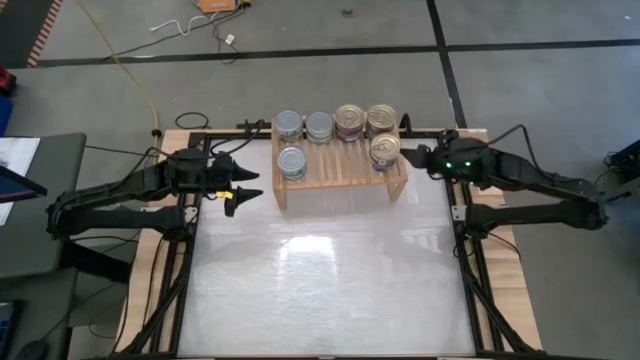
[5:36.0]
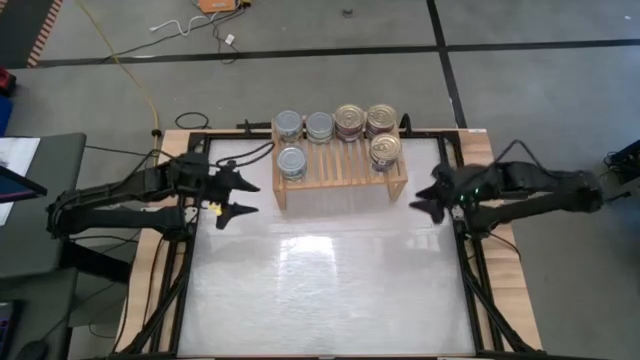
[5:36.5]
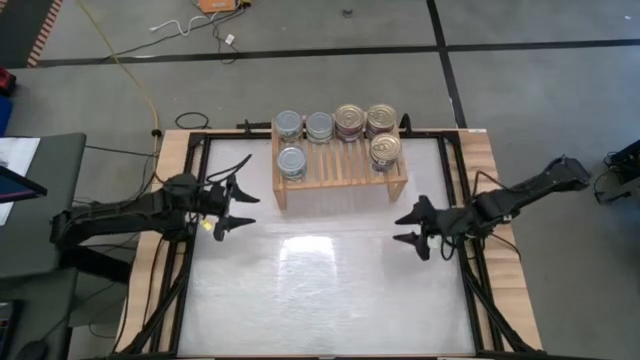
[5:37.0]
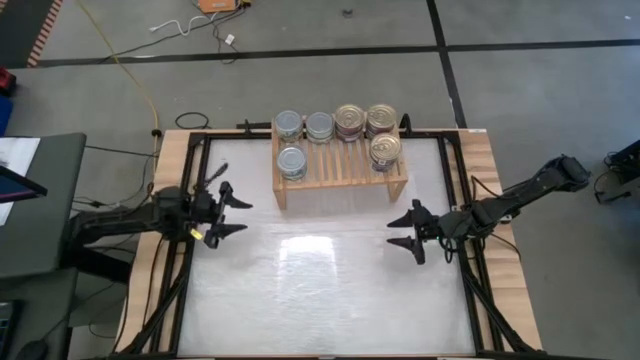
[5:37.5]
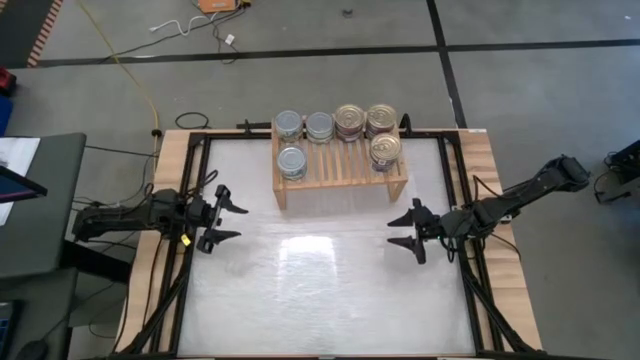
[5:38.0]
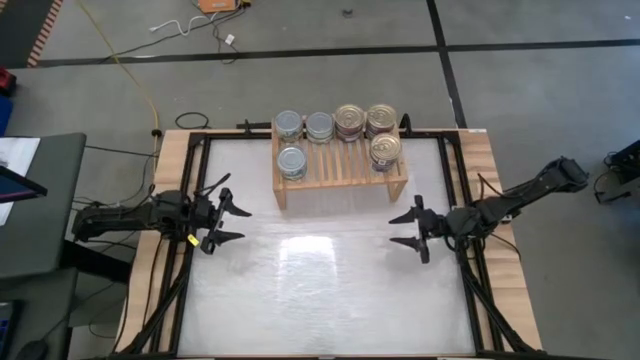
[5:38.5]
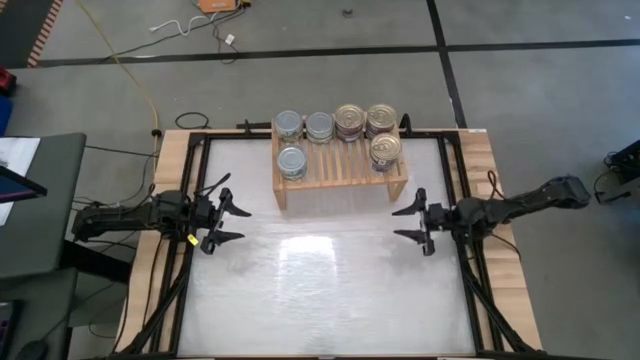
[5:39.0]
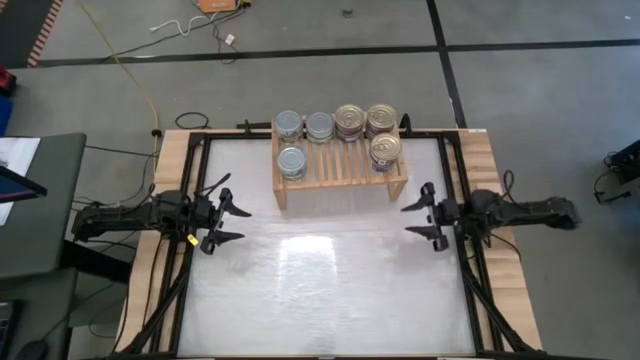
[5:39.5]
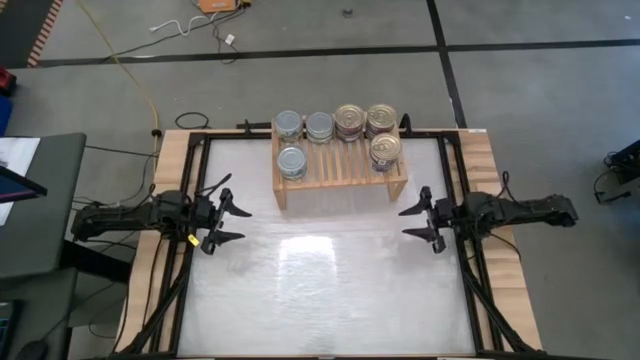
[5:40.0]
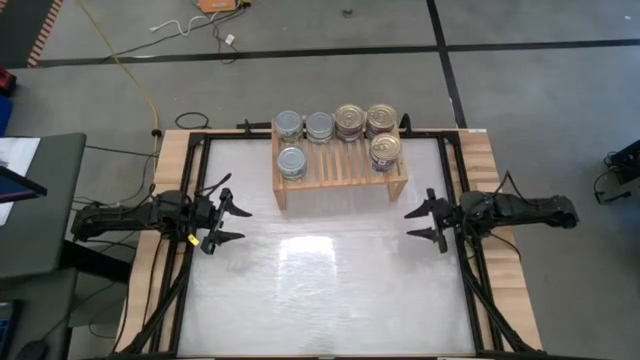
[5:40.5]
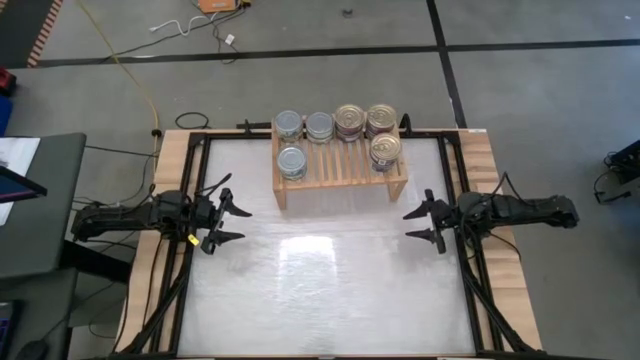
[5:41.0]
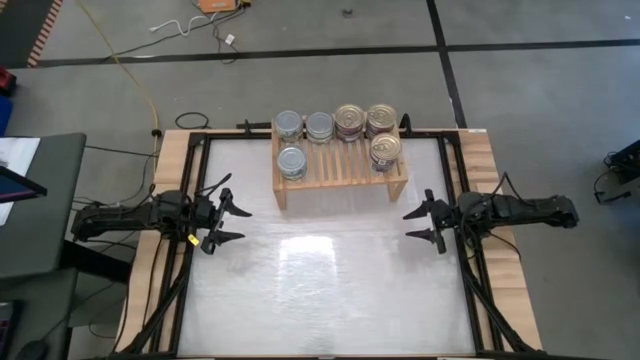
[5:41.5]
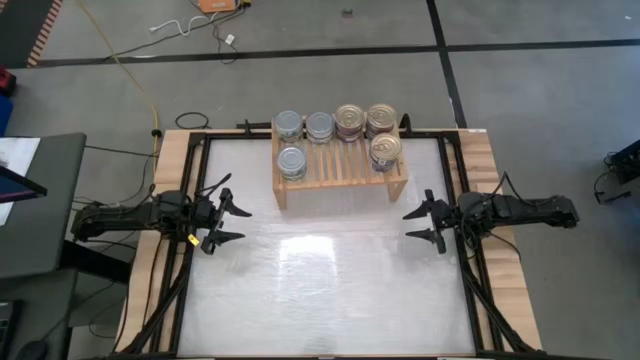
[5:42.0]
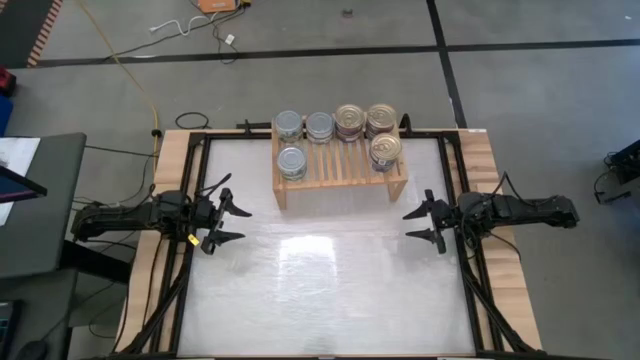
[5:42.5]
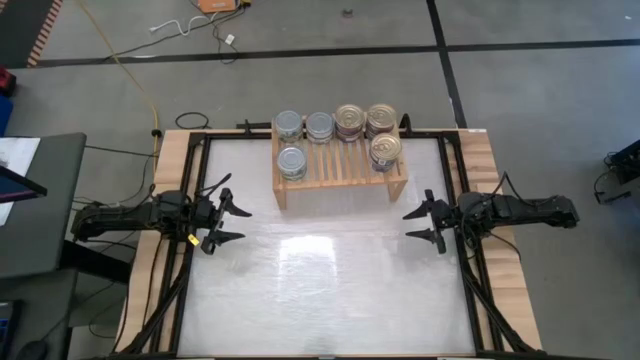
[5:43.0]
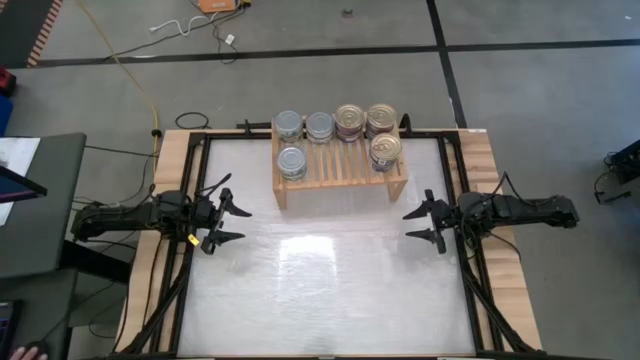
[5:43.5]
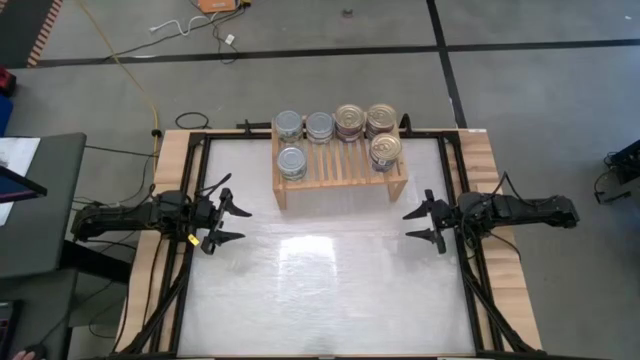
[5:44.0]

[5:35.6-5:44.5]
Task: Stack canned seafood by type on shelf
Return to Home Position

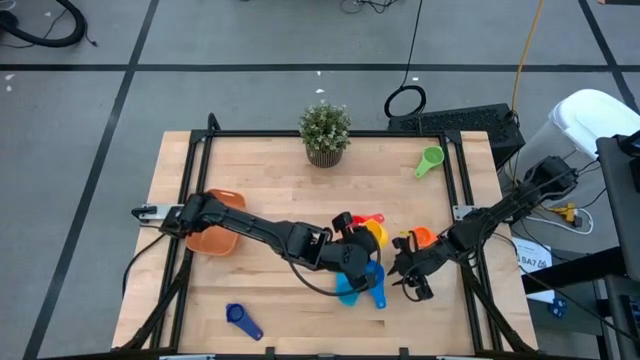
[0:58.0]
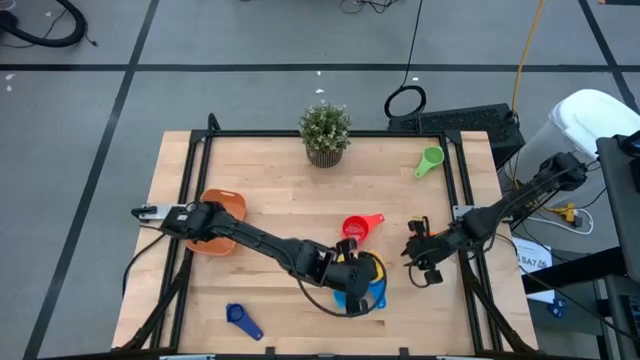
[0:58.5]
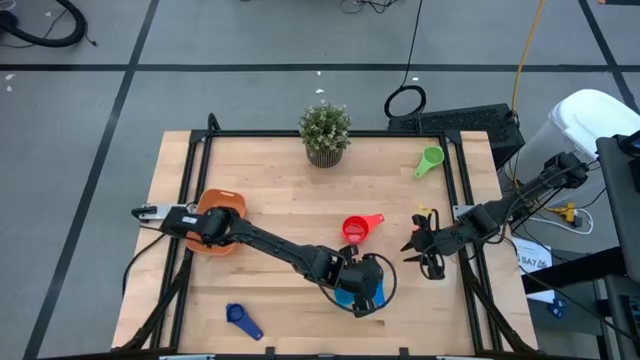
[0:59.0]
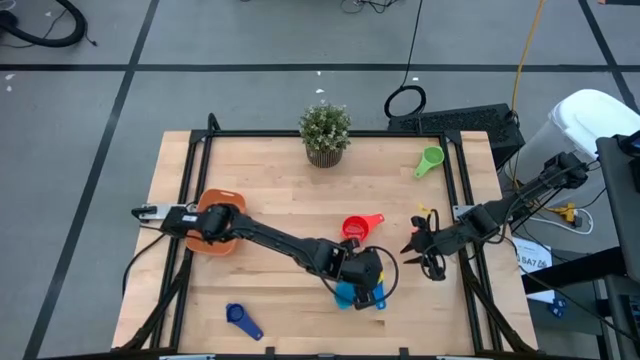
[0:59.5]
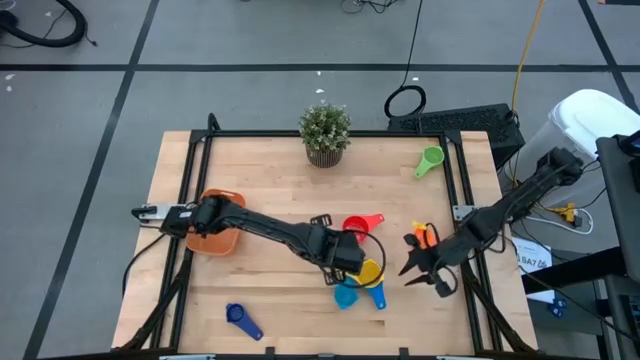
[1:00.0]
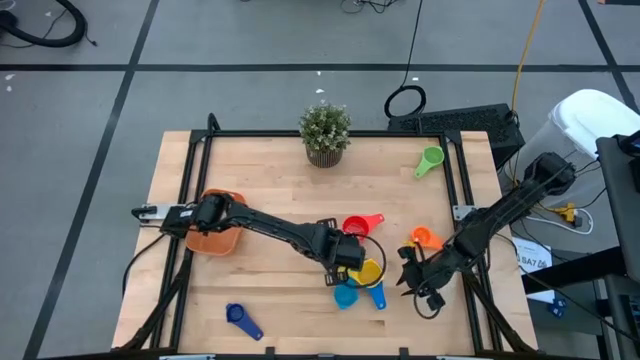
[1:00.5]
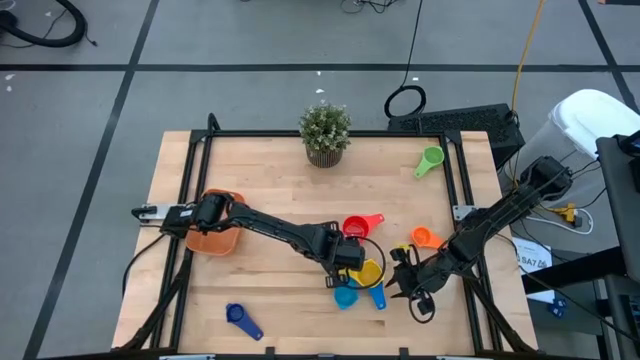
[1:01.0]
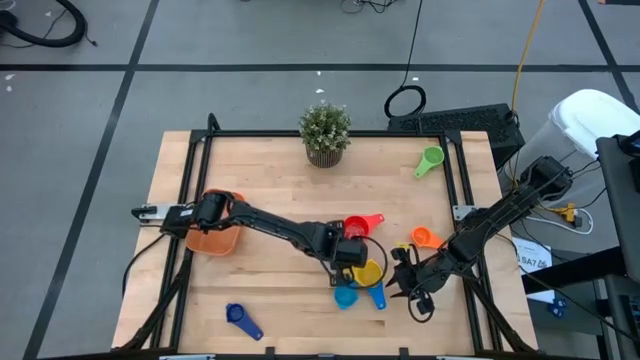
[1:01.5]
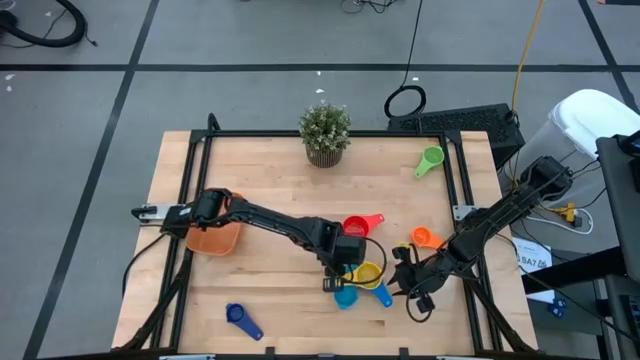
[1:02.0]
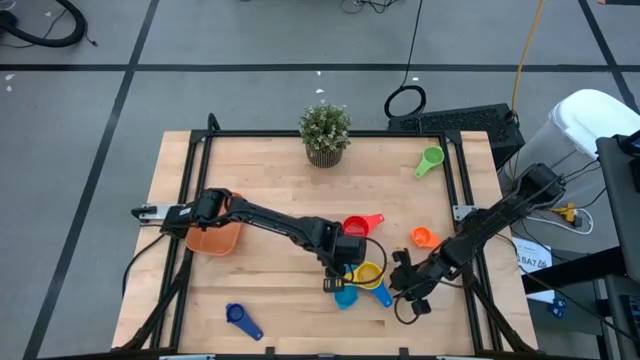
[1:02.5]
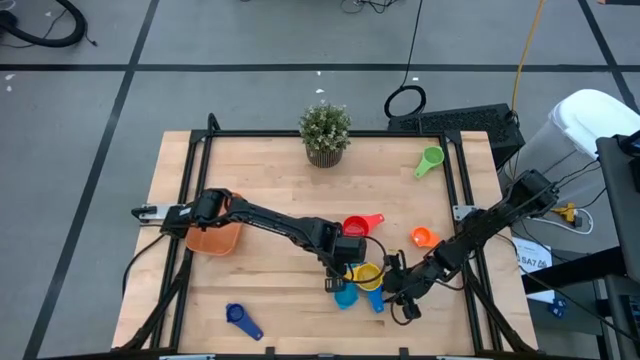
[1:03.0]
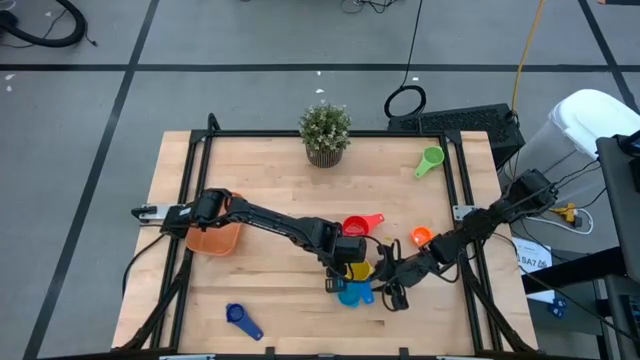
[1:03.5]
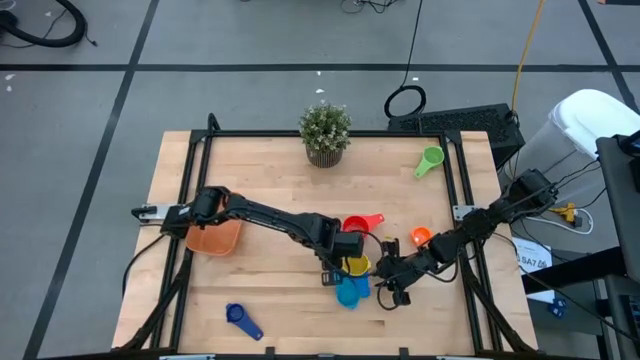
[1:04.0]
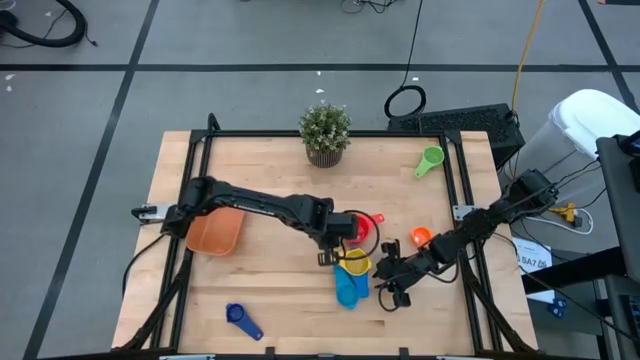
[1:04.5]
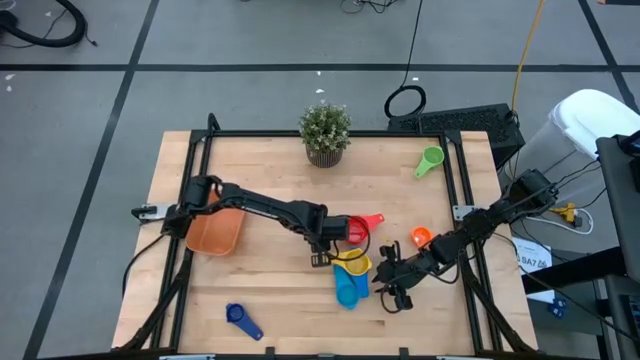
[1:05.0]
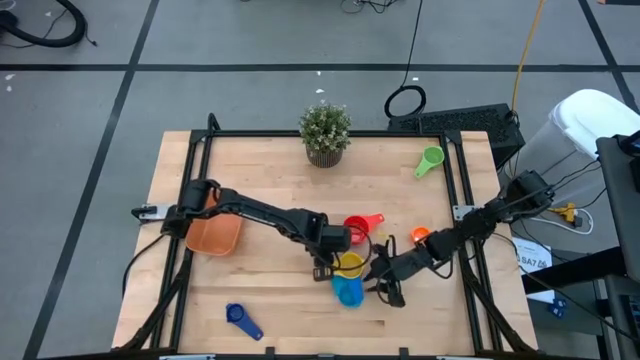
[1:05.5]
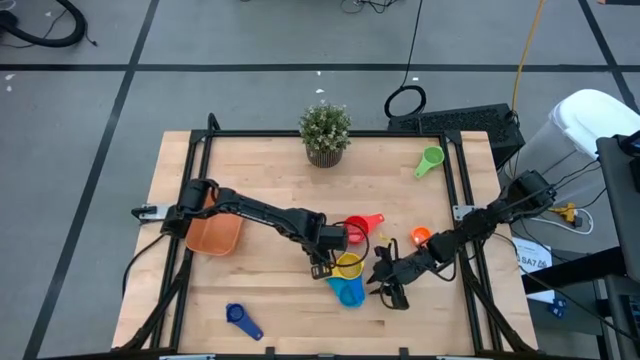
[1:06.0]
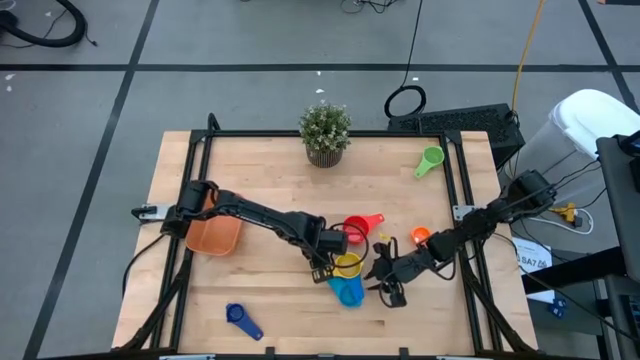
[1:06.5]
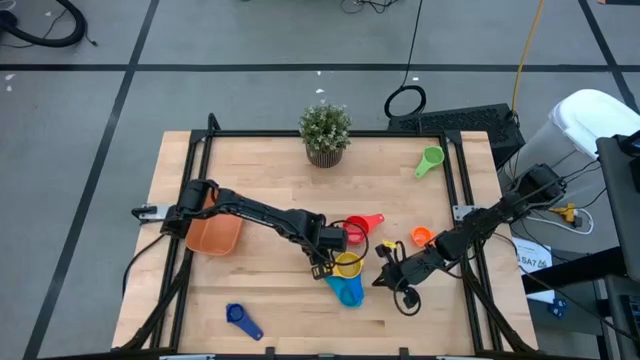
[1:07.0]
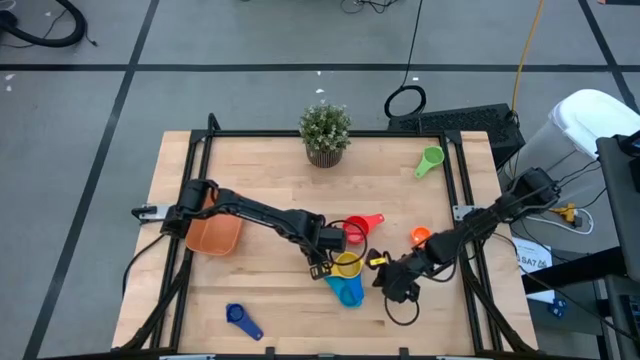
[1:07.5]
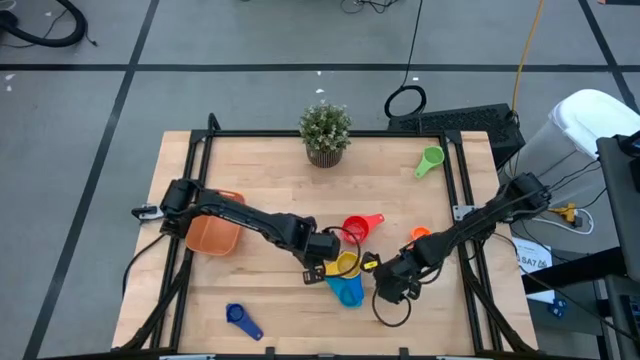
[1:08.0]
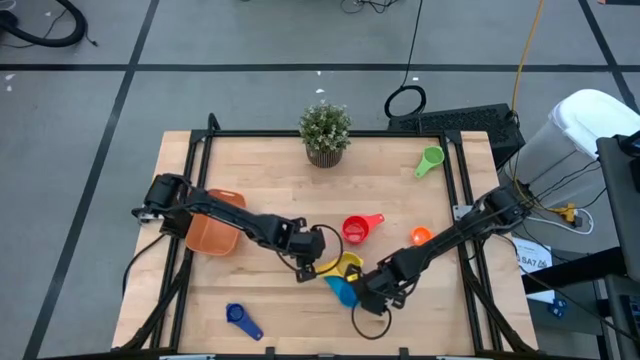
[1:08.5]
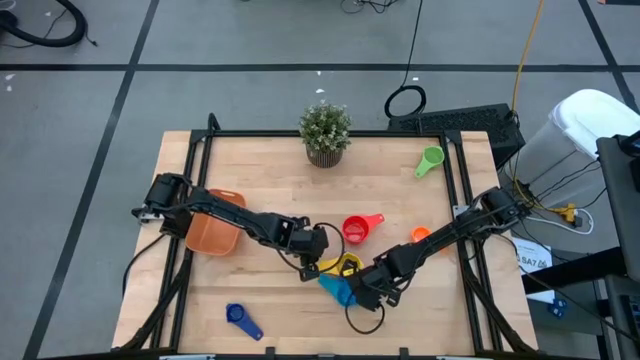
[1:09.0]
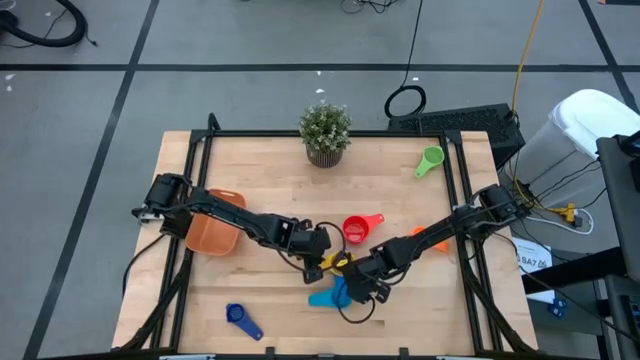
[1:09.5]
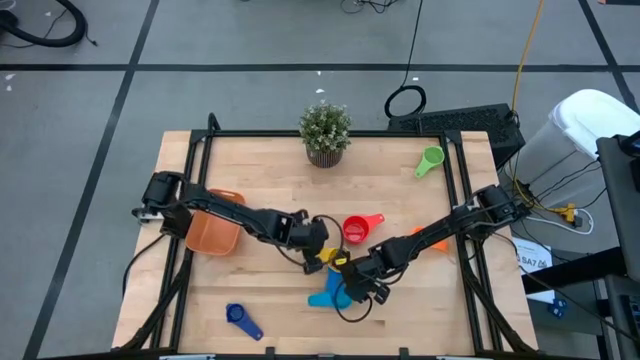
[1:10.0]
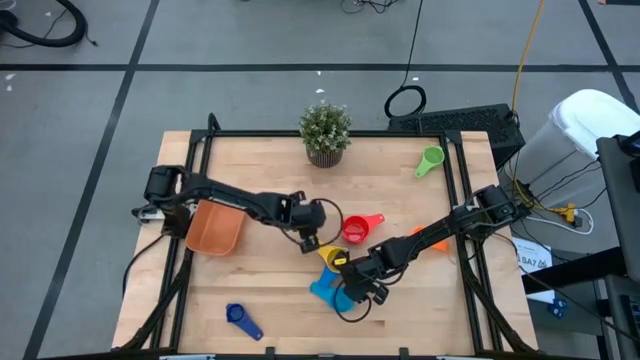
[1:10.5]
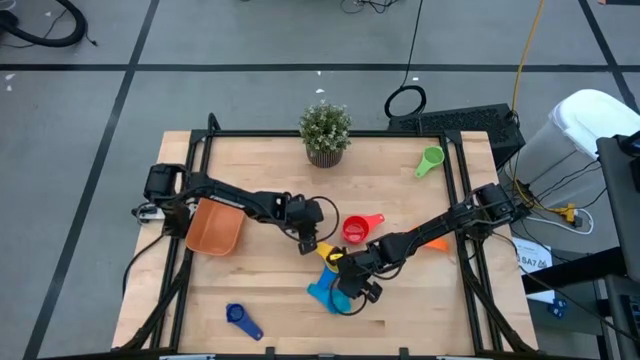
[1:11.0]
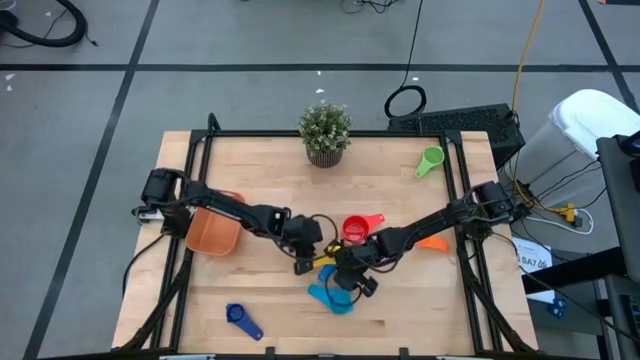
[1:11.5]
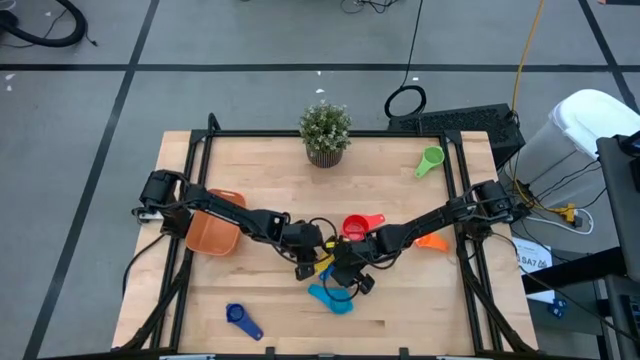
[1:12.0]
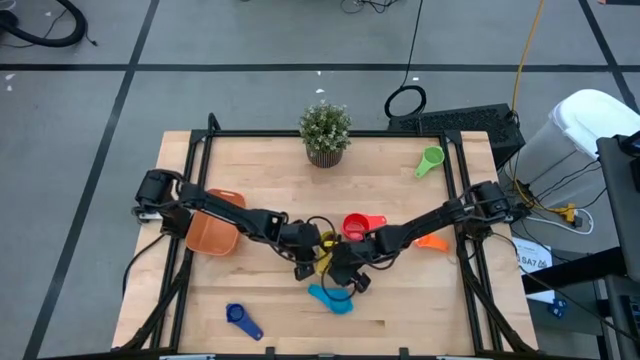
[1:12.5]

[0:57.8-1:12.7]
Task: Nest measuring cups in basket
Stack the yellow measuring cup on top of the blue measuring cup
